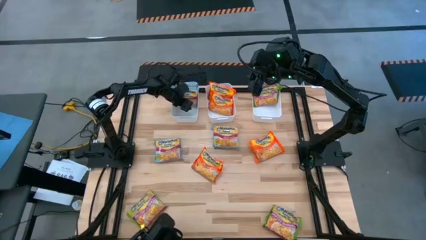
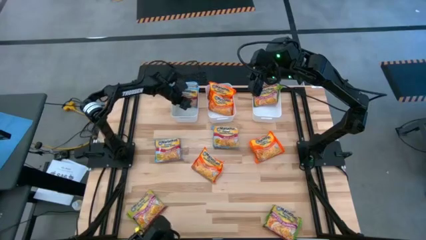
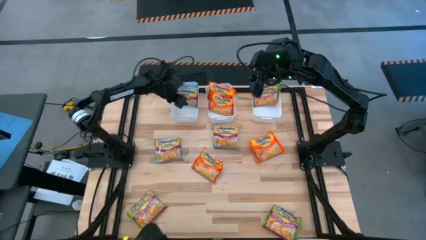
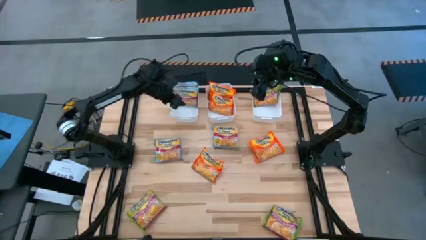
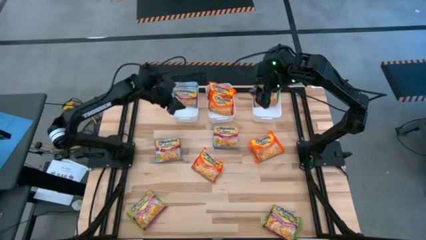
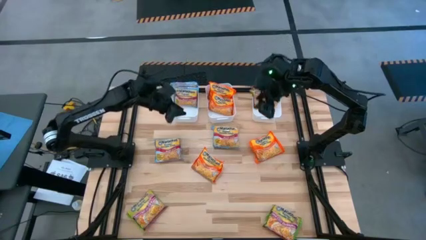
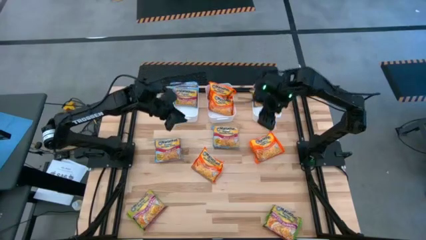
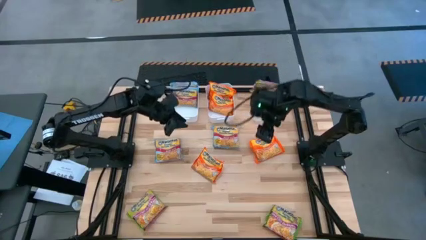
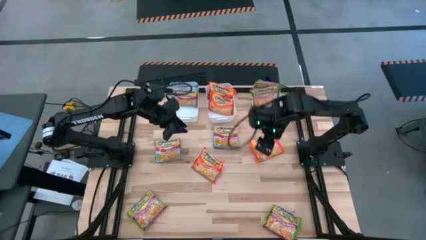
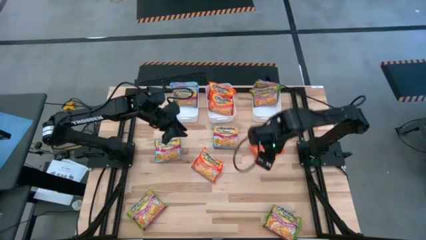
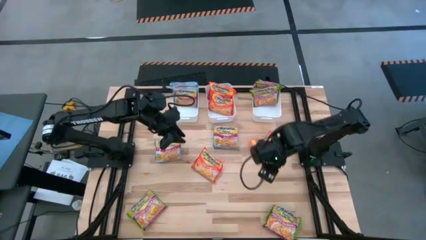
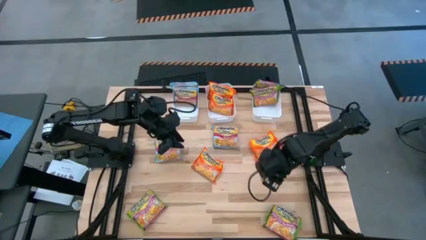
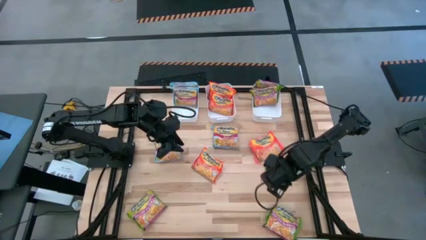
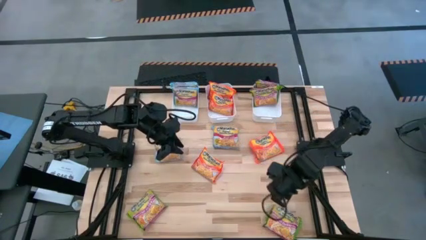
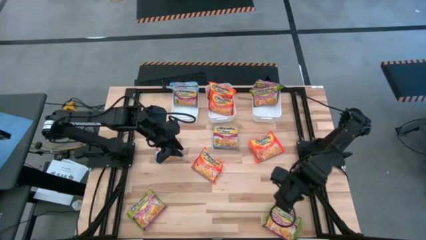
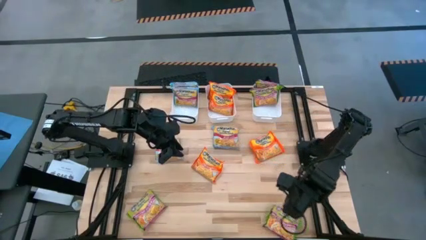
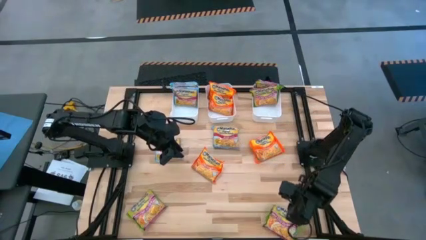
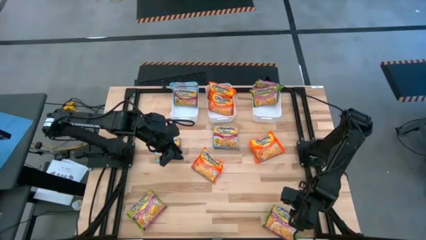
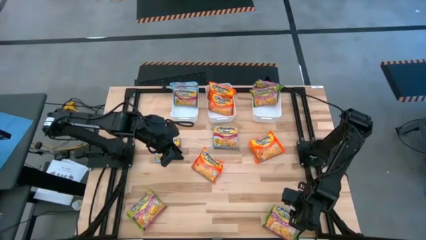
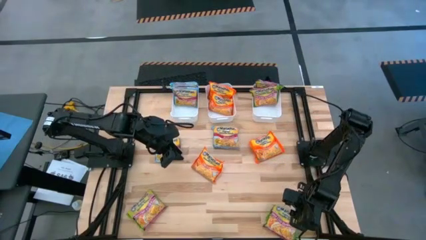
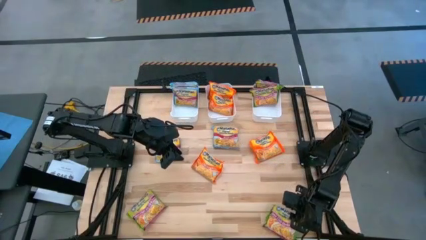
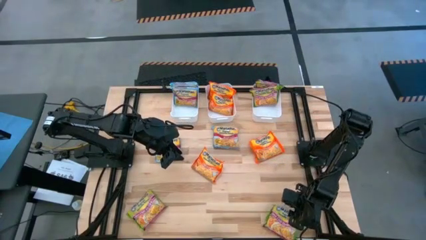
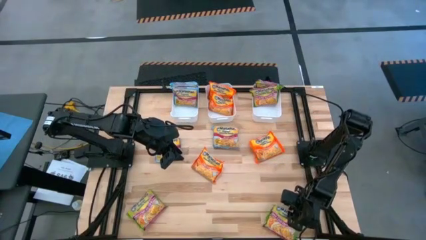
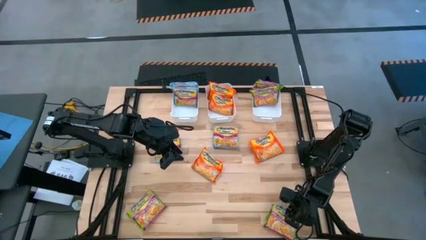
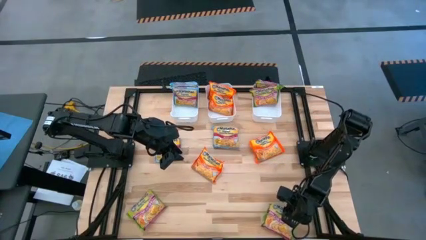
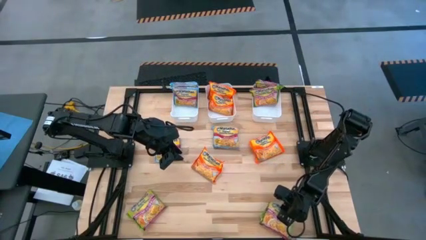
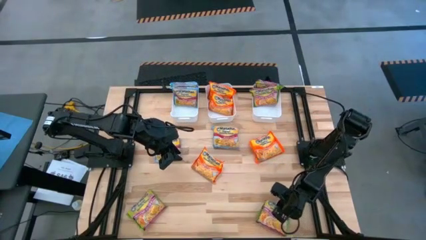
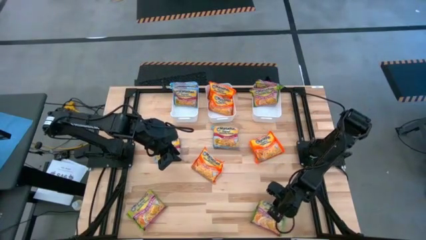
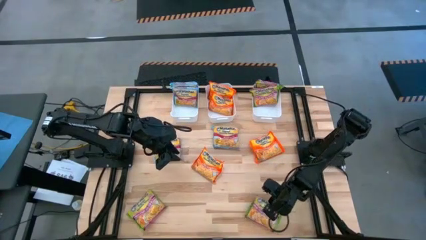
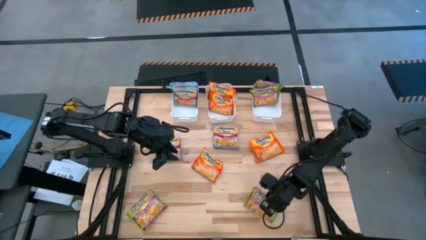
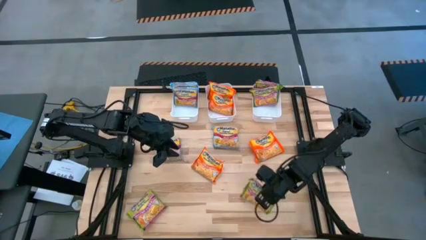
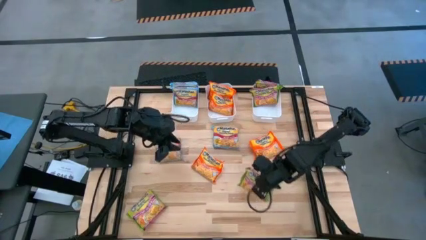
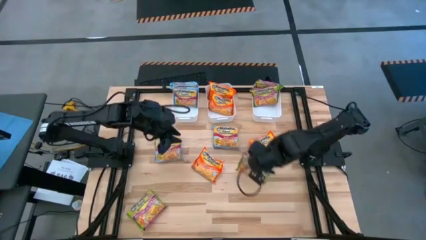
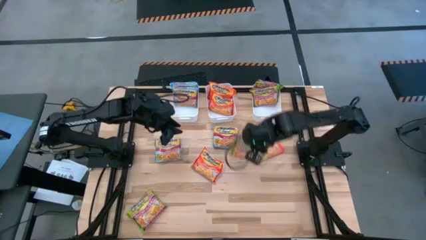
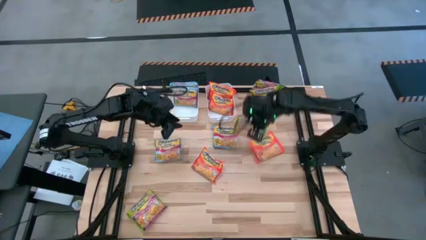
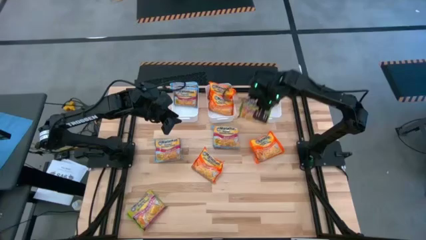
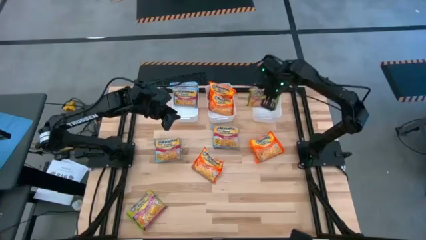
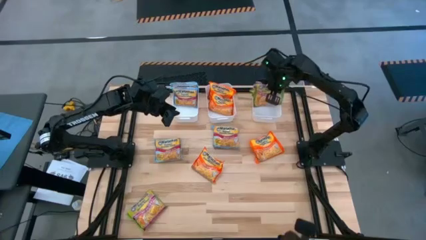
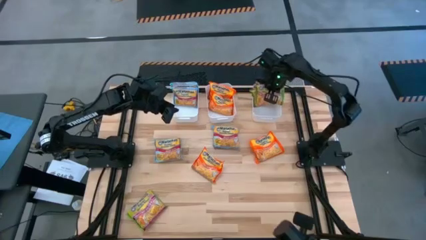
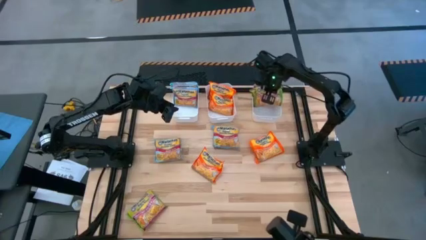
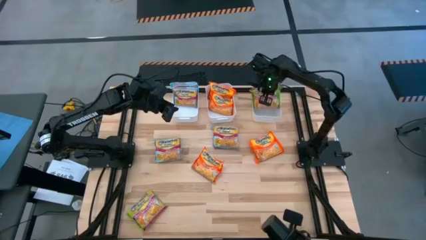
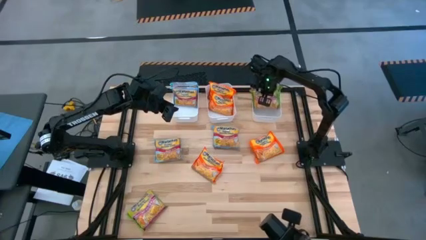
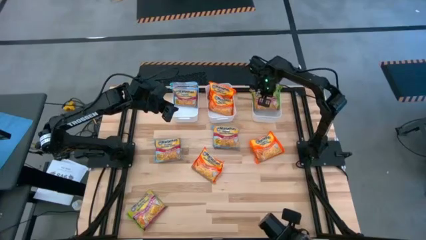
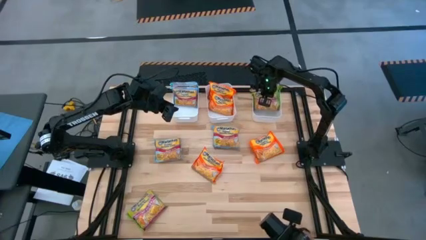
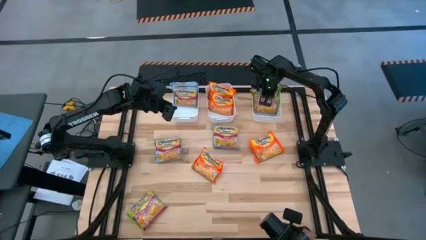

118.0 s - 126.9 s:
Task: Sort Maruchan noodles
Put the green noodle pack into the right white bin

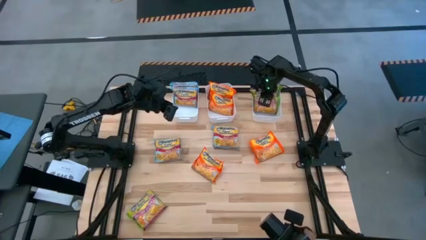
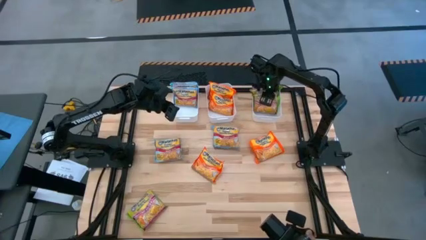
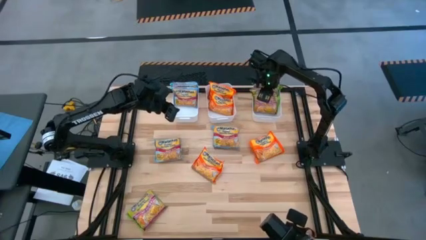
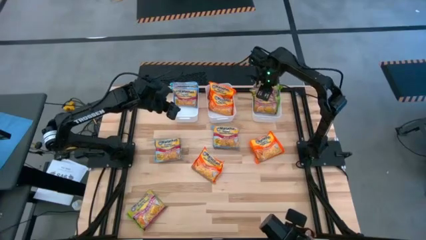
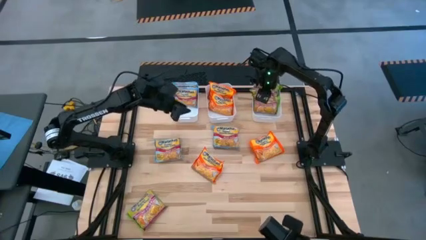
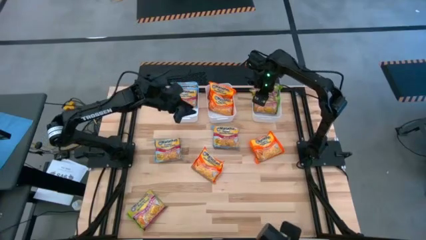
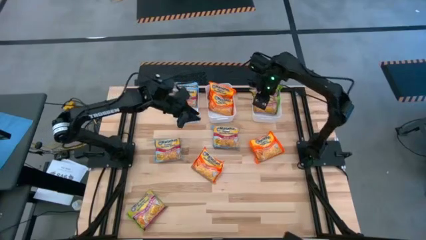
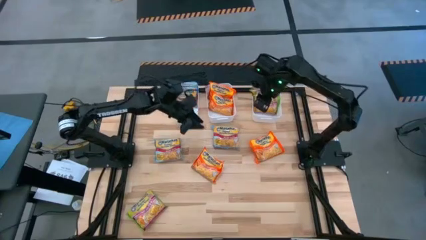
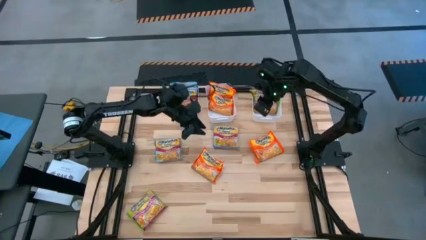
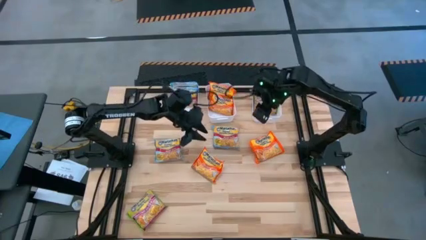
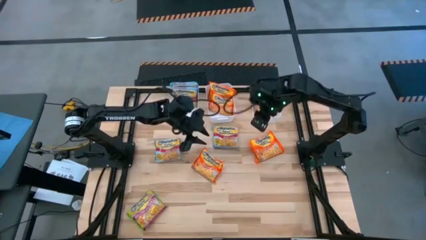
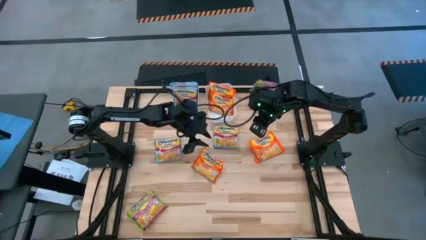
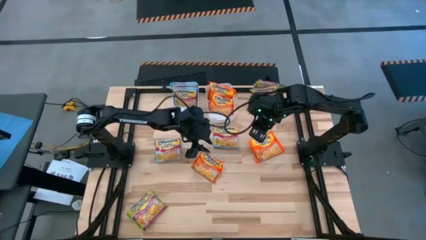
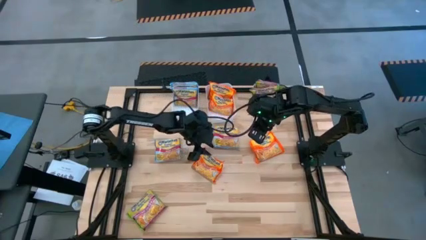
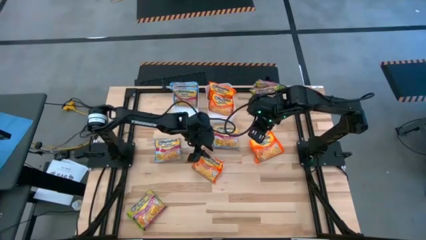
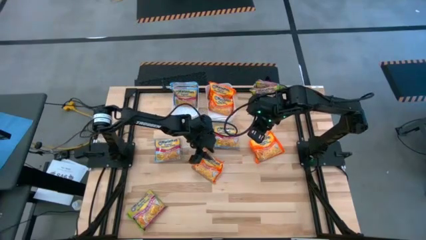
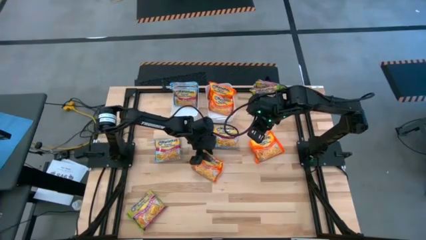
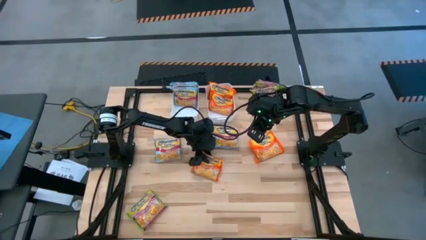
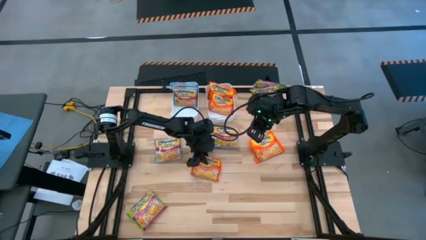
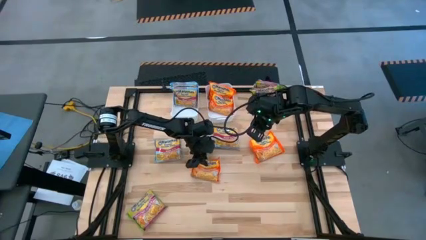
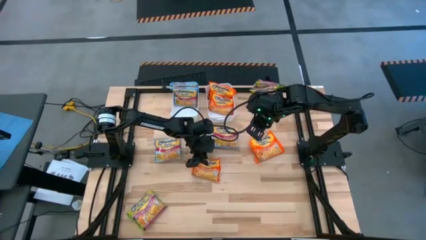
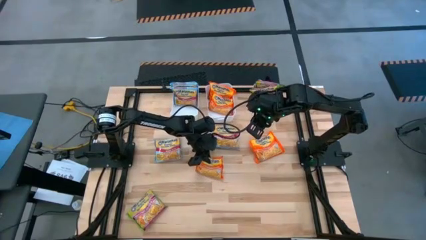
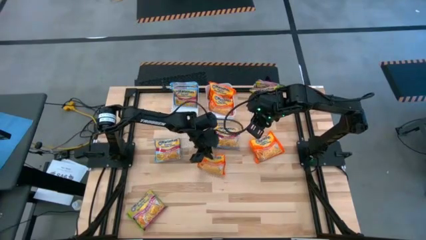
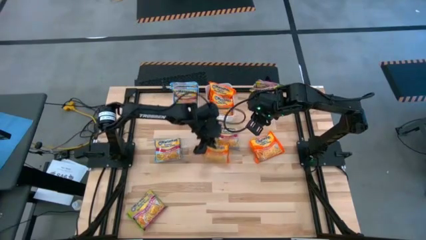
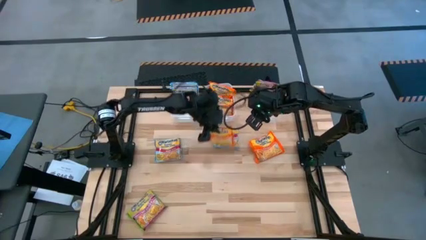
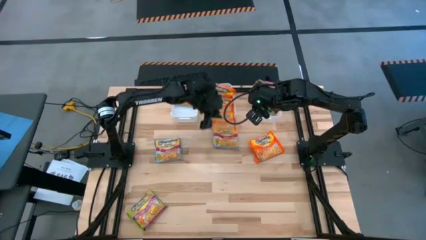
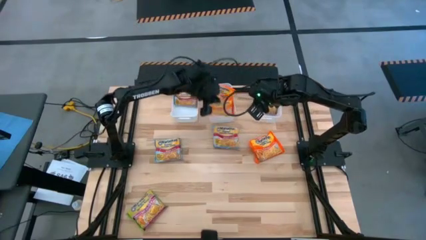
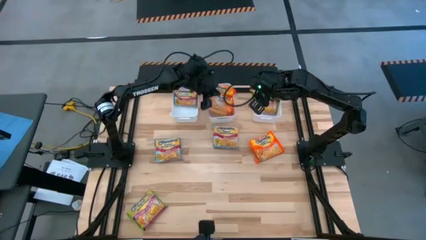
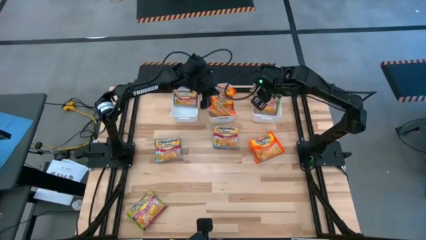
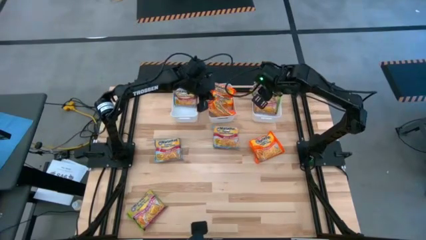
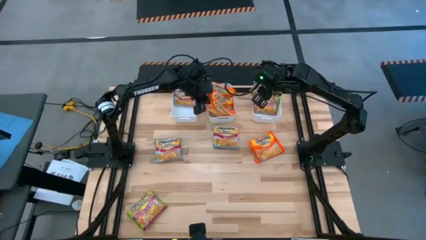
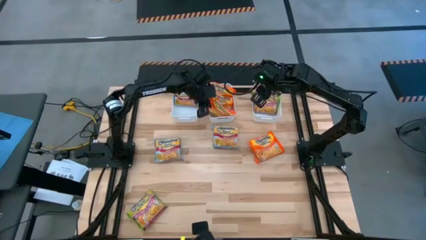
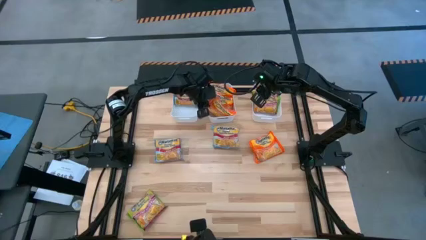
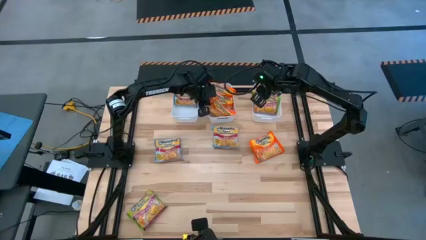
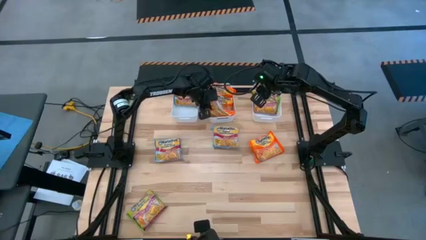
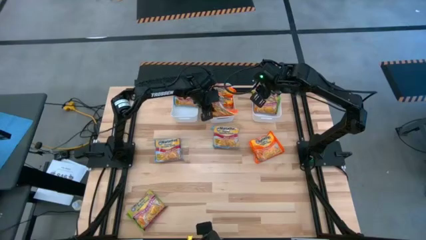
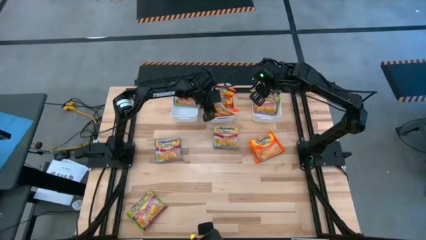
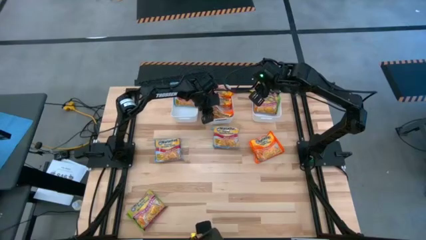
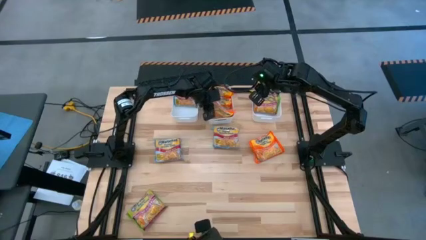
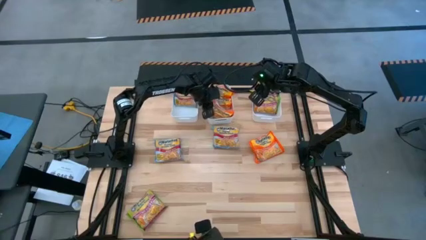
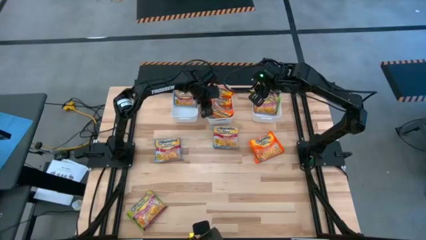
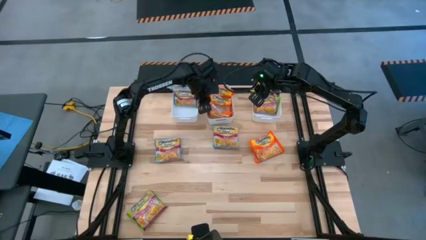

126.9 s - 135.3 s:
Put the orange noodle pack into the middle white bin
